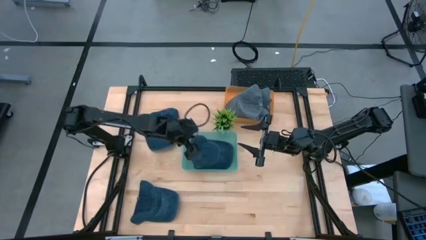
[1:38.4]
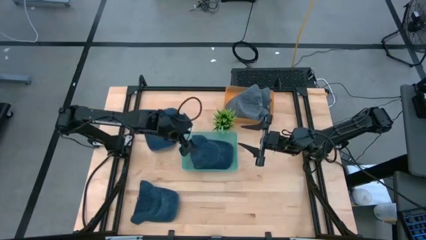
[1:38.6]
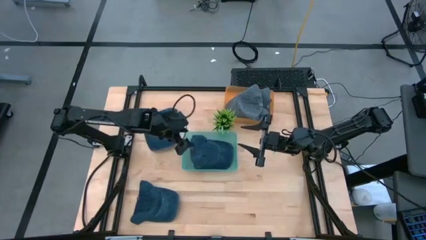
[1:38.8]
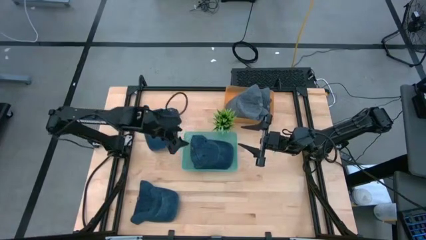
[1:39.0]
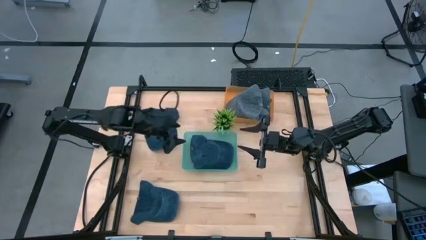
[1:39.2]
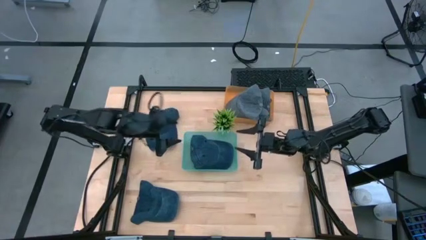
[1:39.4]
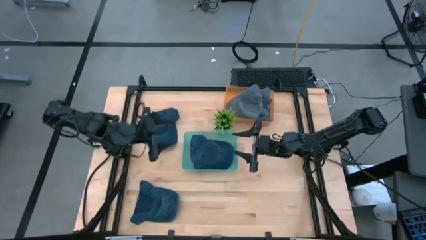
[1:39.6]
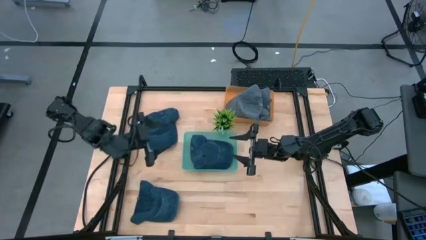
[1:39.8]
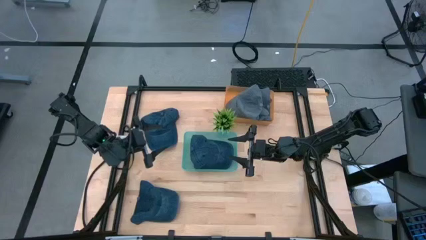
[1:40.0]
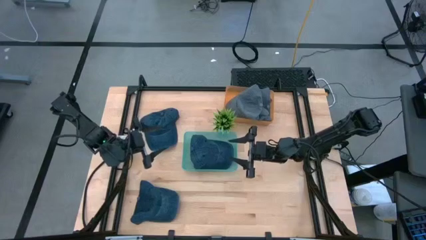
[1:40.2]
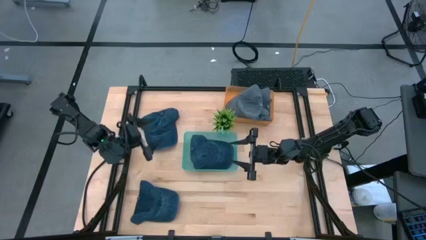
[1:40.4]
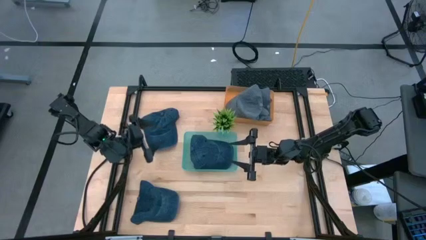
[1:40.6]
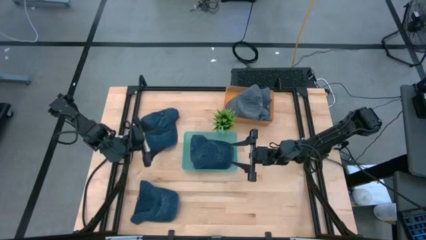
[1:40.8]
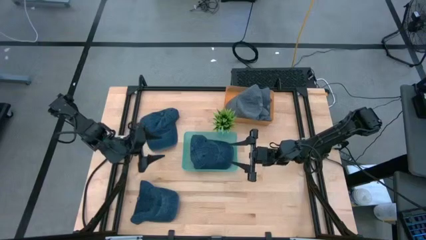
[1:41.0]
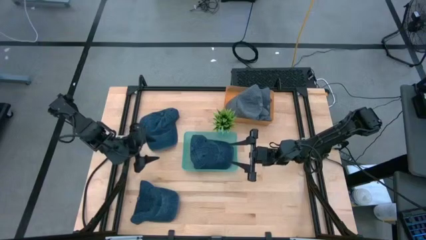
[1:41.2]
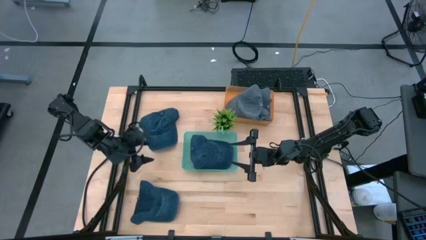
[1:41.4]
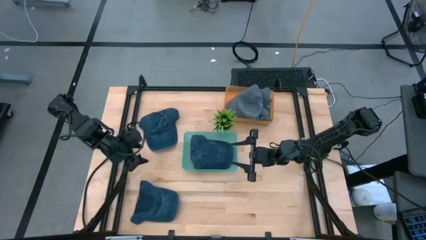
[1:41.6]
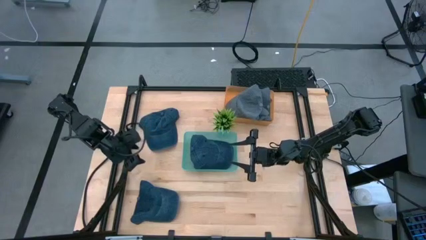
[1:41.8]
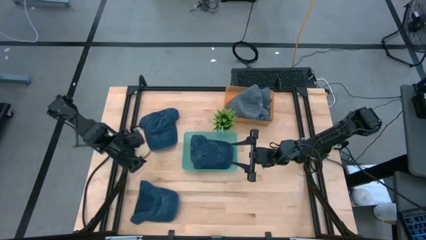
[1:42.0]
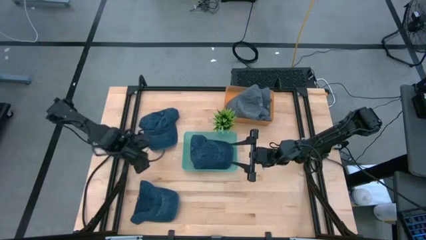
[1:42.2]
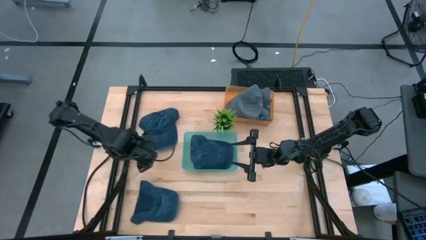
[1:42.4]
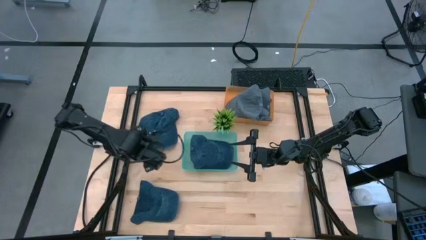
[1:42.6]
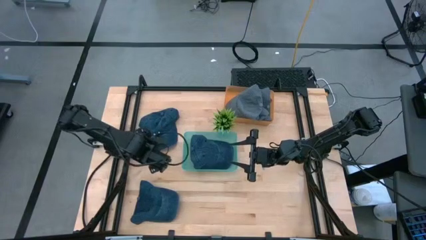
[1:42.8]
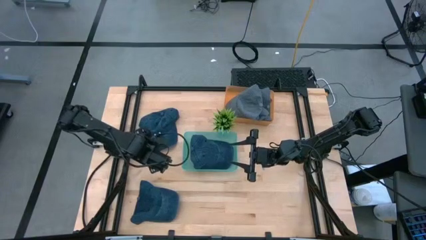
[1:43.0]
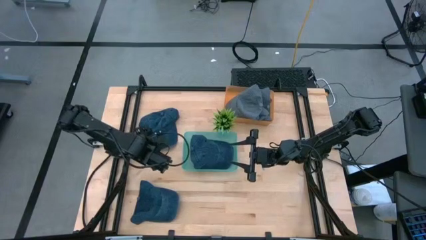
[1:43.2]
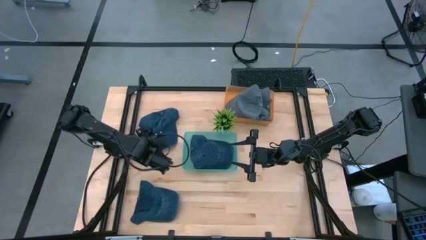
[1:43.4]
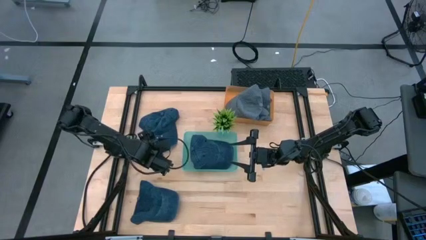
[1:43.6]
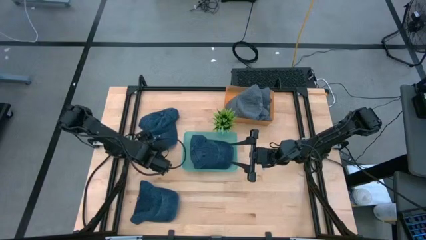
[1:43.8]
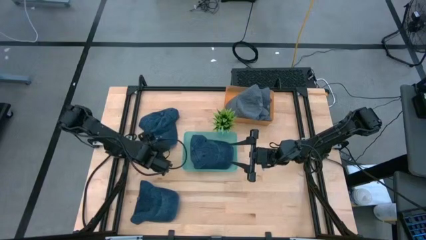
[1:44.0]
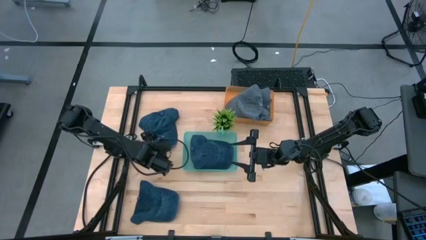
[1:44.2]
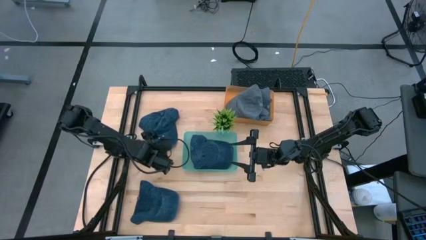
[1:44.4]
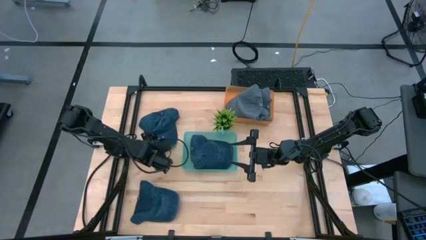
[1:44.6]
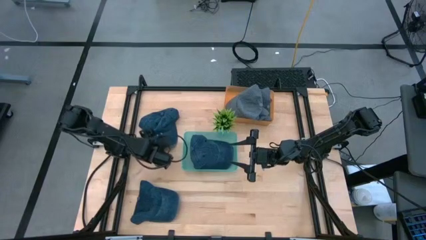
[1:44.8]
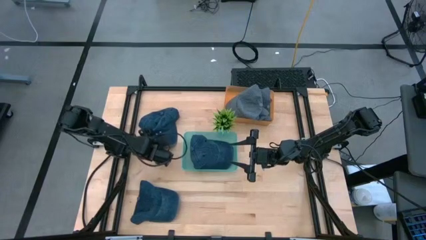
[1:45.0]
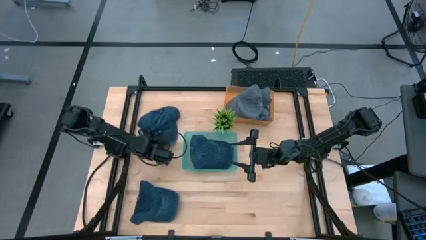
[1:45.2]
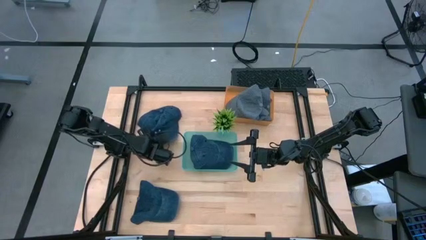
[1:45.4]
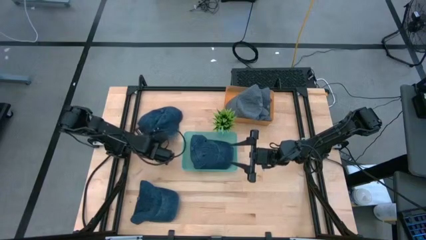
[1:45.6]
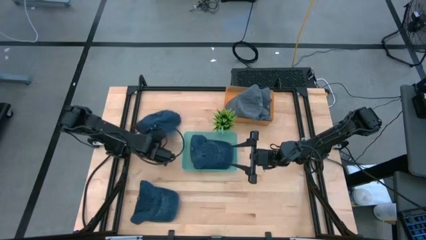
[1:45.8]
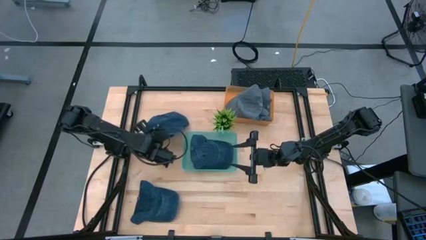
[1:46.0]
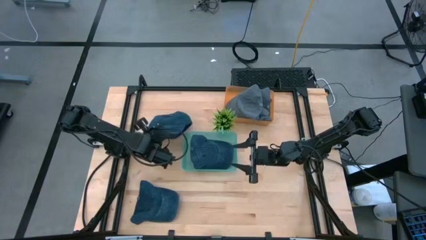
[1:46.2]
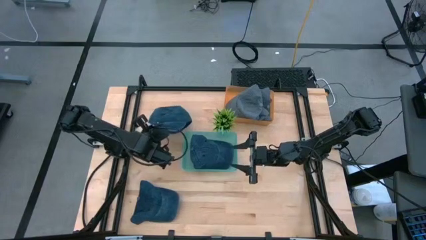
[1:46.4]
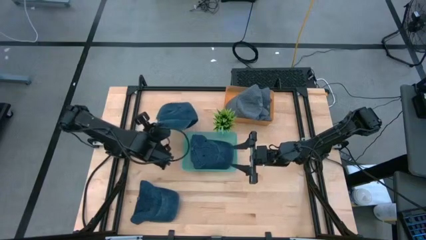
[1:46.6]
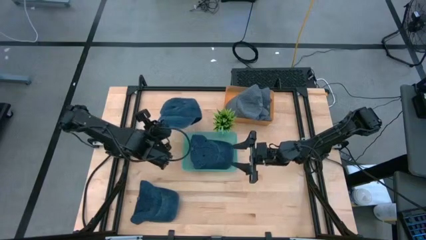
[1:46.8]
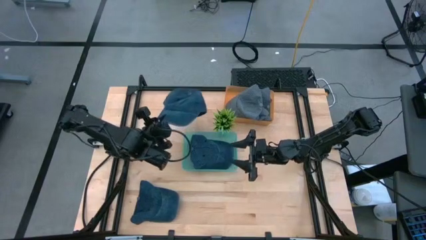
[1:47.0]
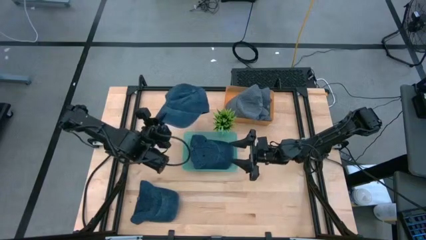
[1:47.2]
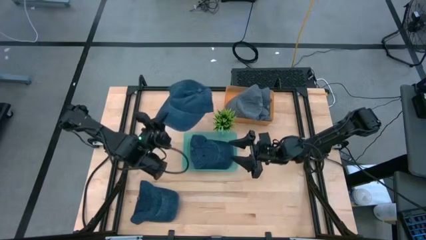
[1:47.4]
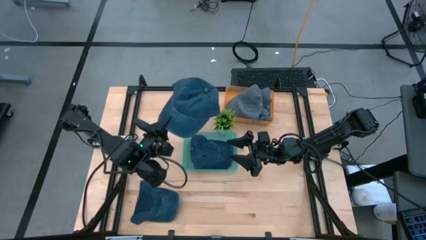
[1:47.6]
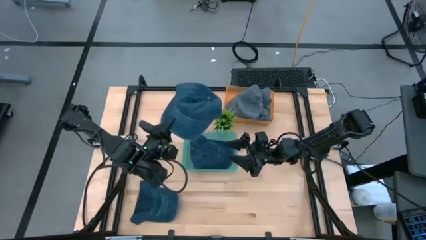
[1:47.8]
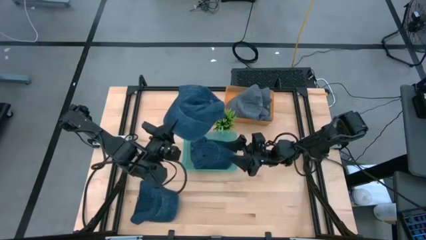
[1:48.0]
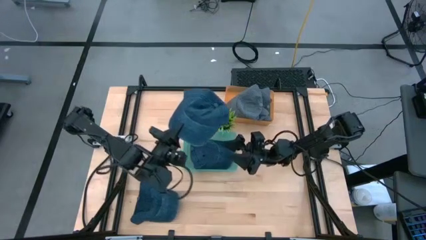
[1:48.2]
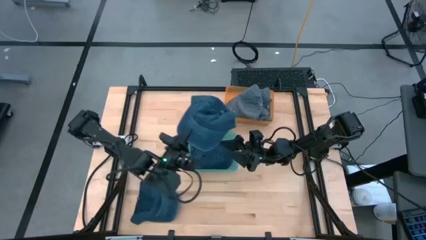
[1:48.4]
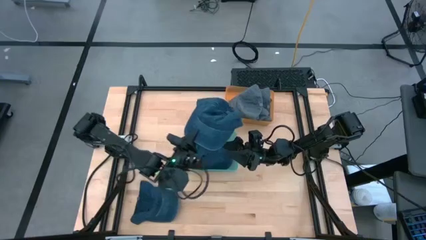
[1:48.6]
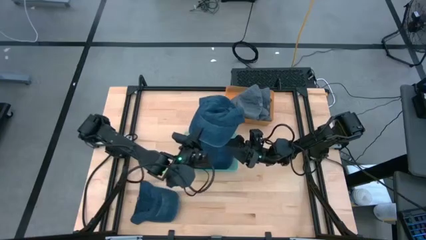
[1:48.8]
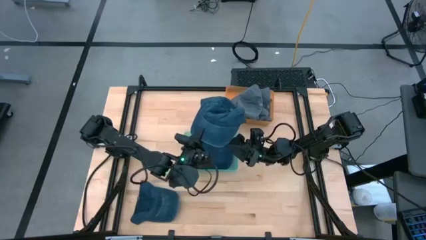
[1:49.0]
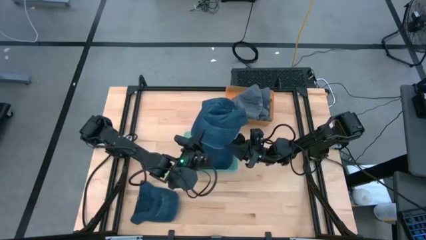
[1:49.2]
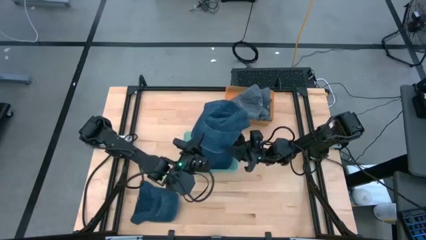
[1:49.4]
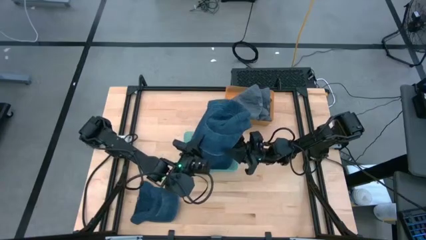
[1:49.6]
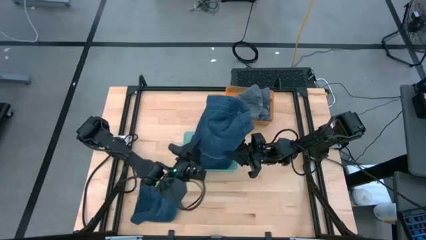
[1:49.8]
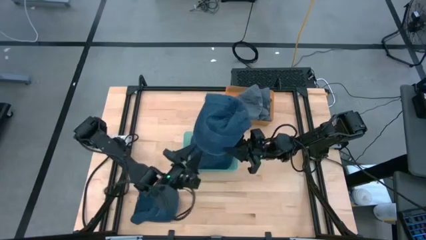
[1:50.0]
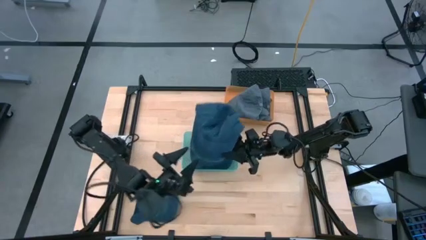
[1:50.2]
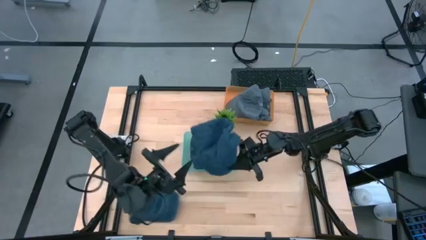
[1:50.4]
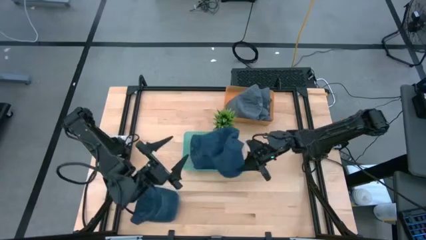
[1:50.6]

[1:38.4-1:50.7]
Task: Pick & Place hat
Put the top blue cap into the green bin

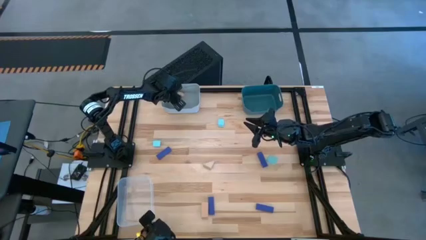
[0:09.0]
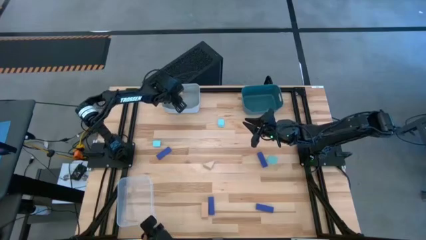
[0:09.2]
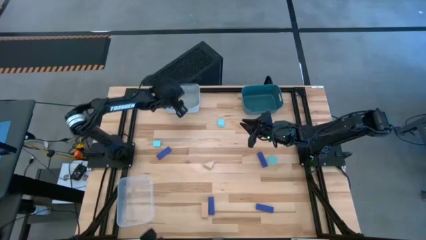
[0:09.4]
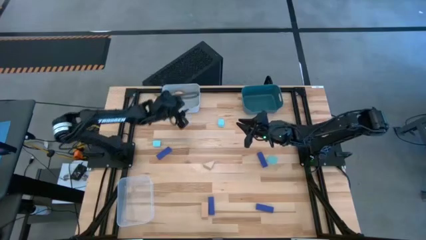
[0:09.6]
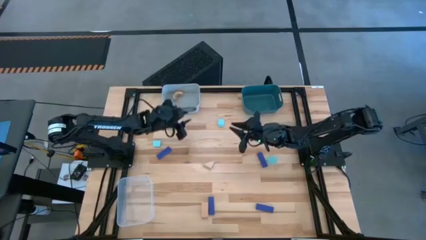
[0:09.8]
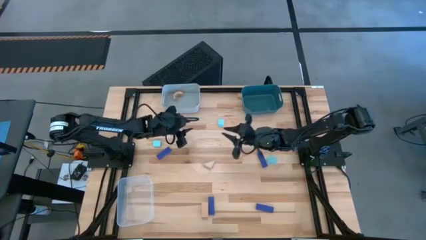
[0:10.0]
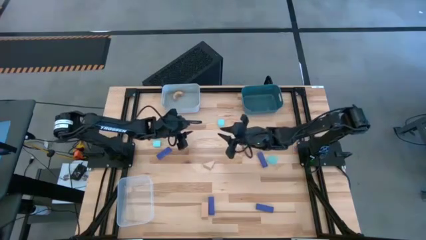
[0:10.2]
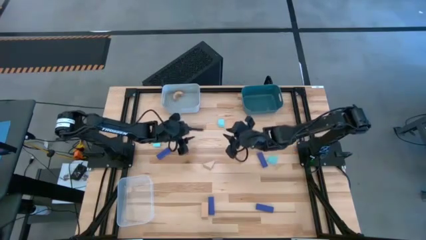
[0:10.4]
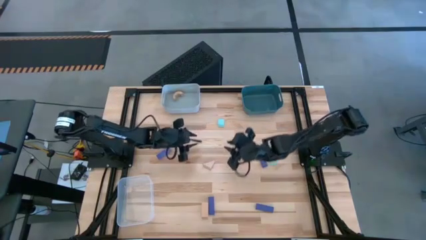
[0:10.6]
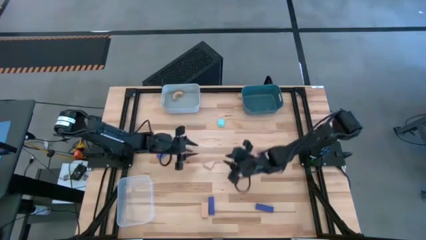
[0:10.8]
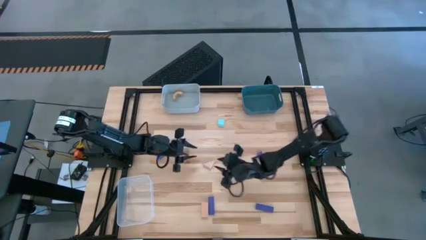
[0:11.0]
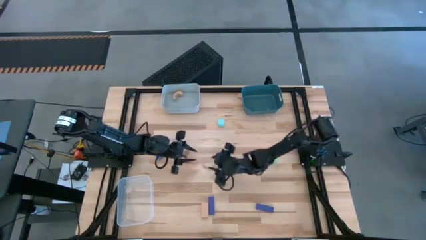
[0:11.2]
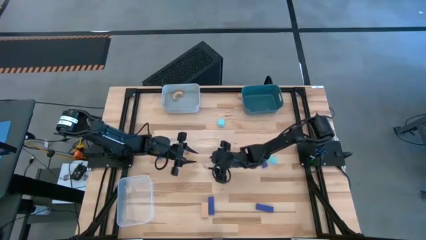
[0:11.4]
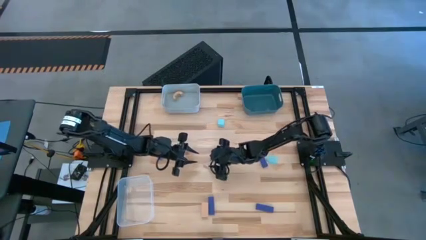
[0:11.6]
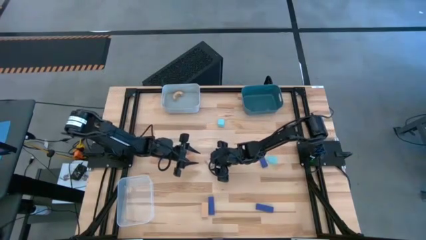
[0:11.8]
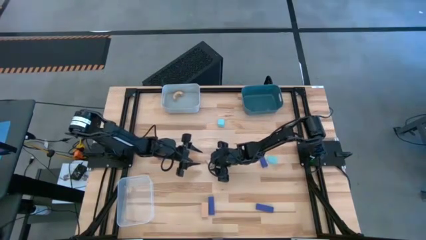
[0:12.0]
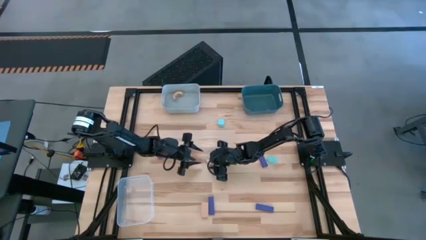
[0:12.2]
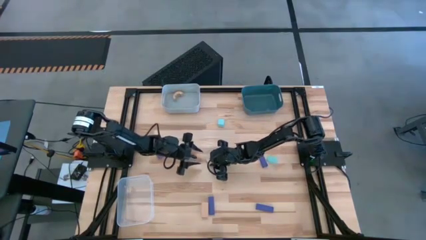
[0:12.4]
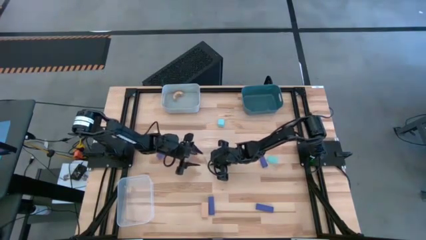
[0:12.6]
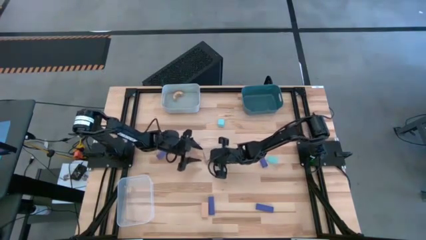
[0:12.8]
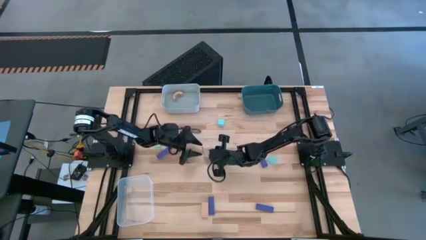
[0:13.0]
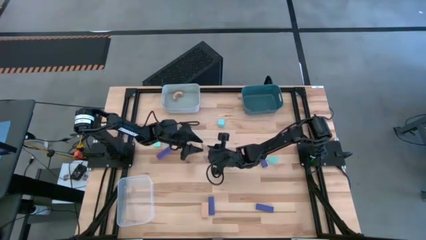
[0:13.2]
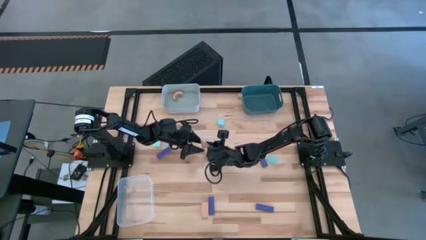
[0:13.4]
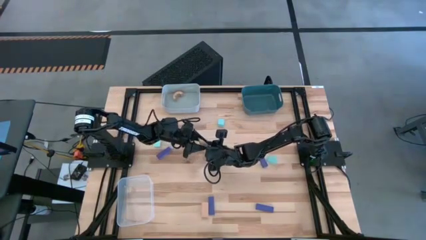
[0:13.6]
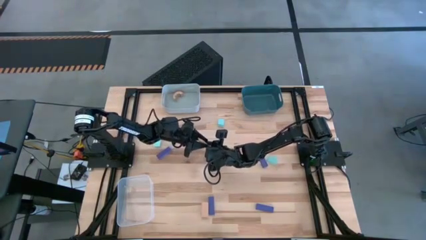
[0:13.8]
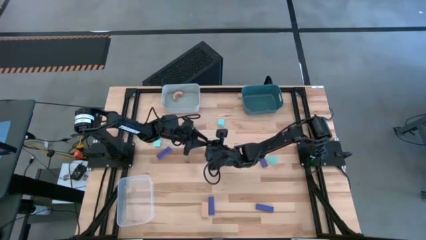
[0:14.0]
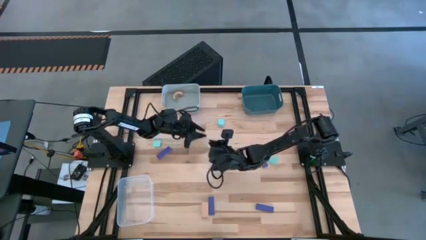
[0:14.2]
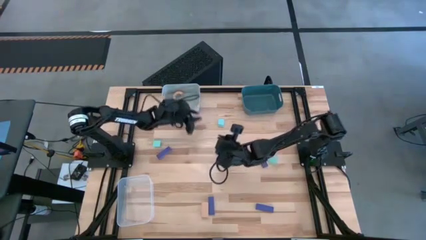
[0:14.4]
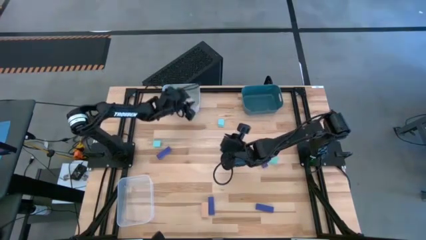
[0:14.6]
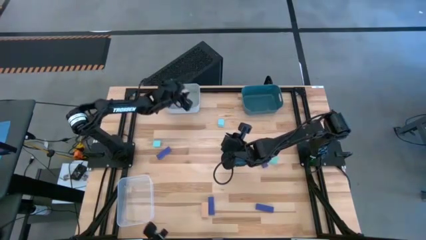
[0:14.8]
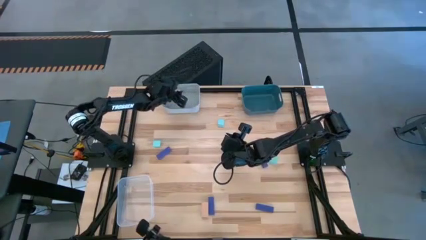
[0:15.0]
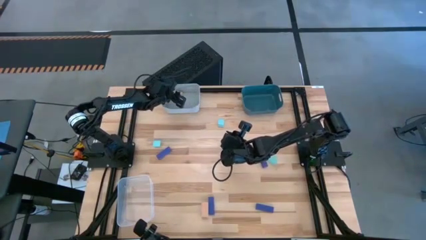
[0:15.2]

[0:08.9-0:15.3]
Task: Sort & place blocks by color
Put the brown block into the gray bin
